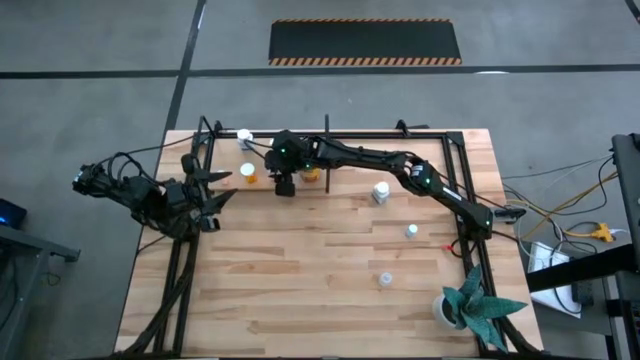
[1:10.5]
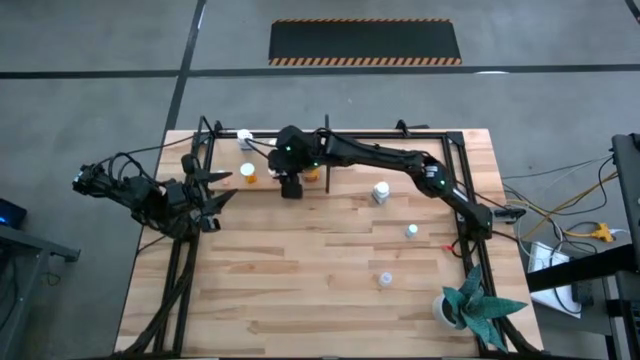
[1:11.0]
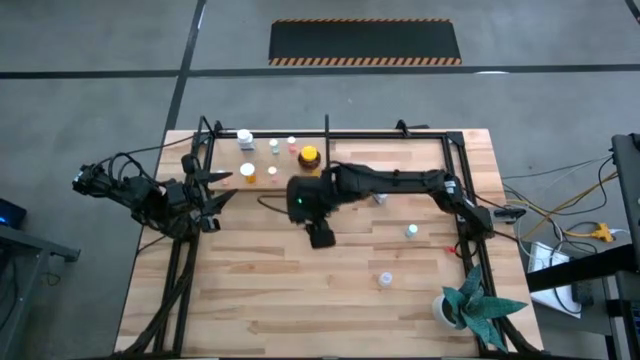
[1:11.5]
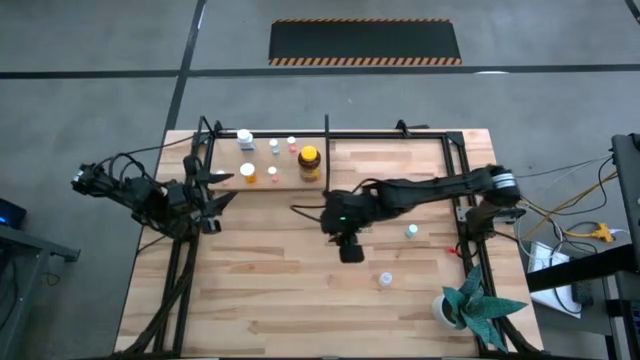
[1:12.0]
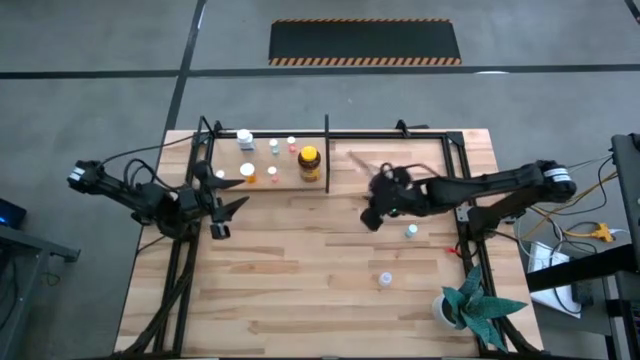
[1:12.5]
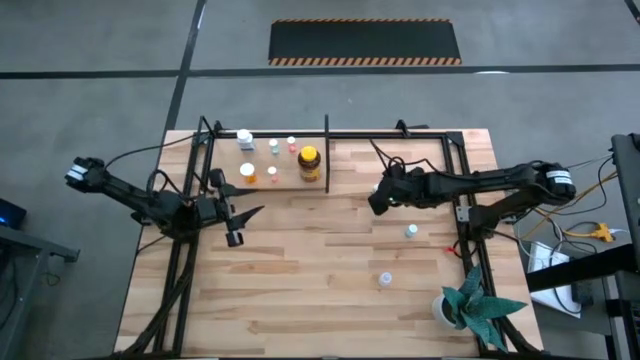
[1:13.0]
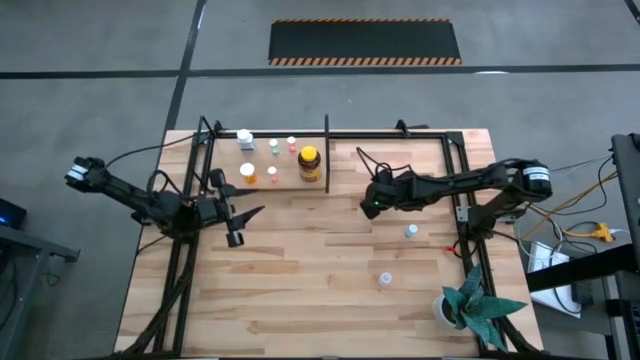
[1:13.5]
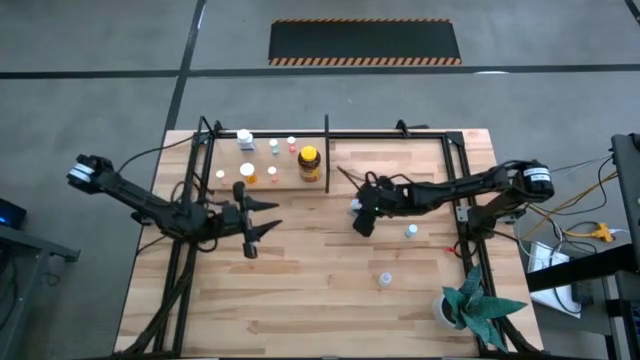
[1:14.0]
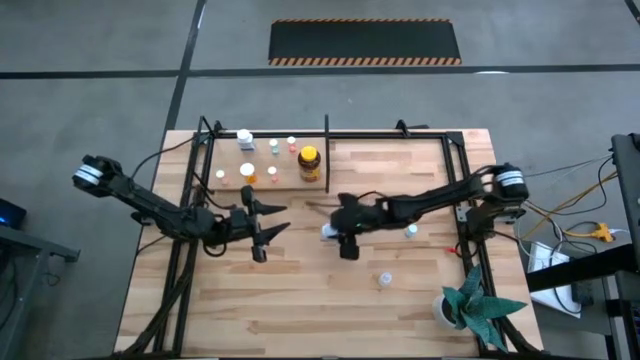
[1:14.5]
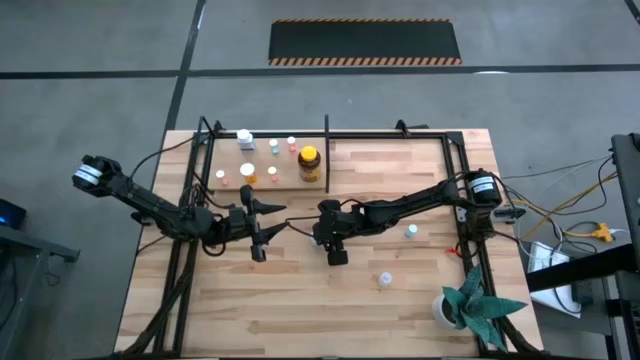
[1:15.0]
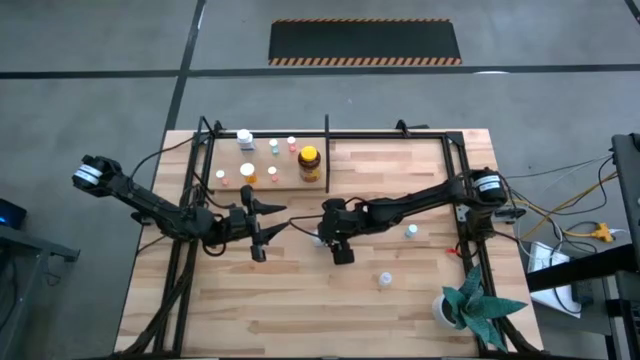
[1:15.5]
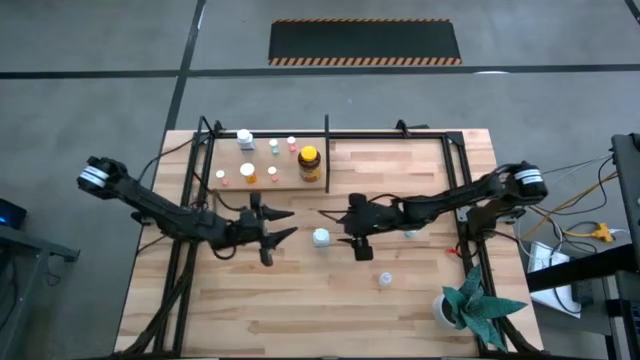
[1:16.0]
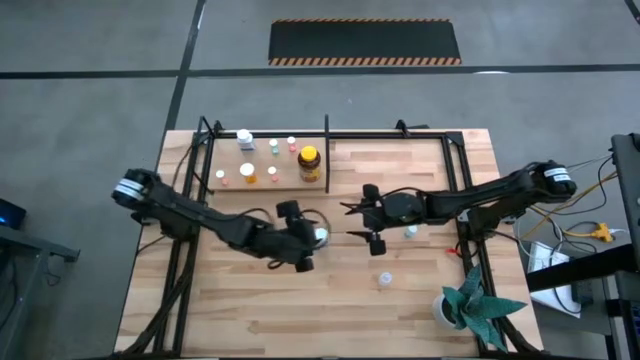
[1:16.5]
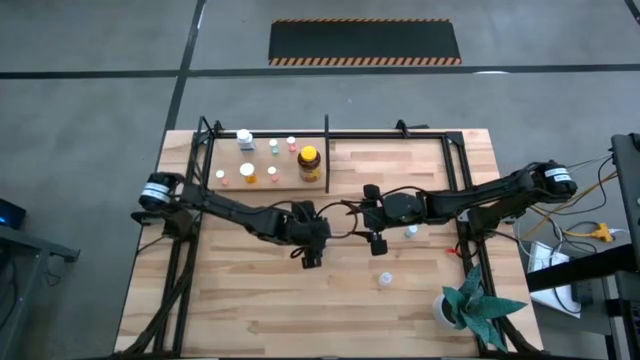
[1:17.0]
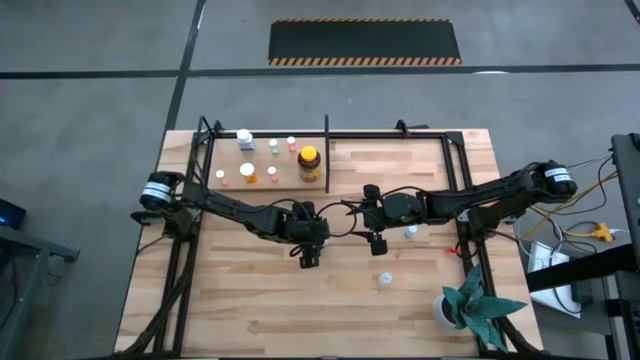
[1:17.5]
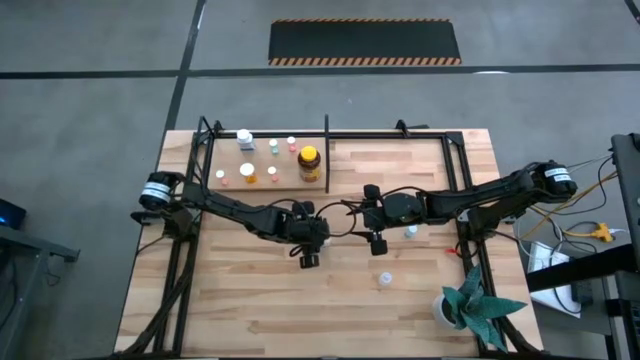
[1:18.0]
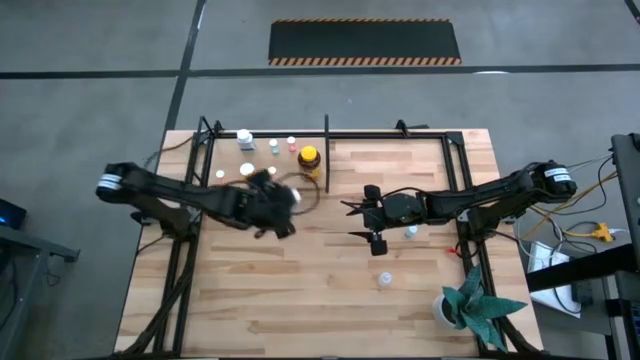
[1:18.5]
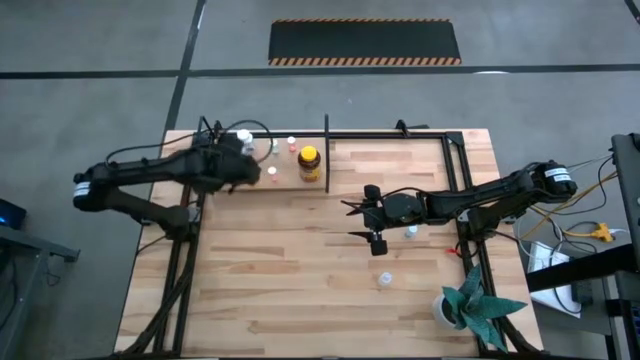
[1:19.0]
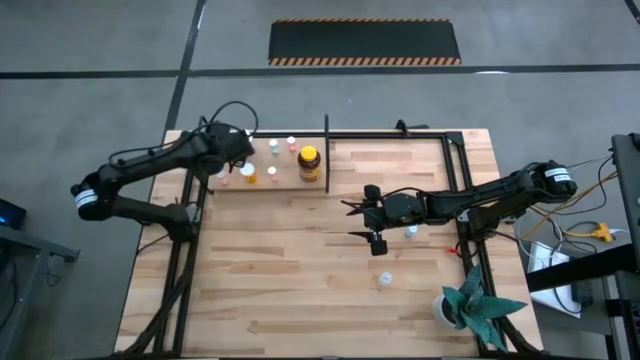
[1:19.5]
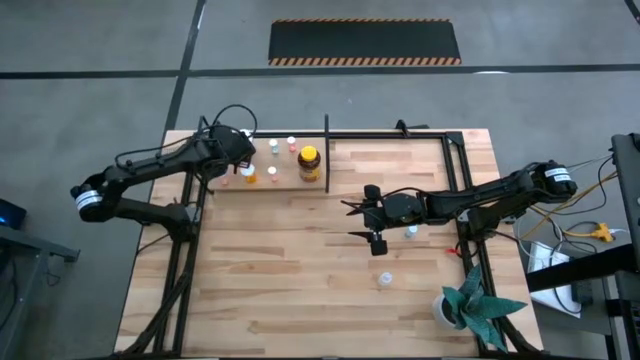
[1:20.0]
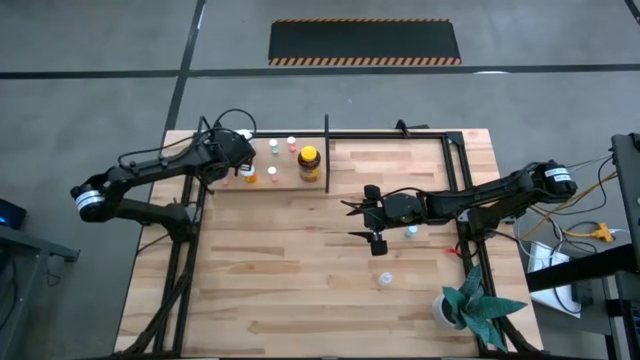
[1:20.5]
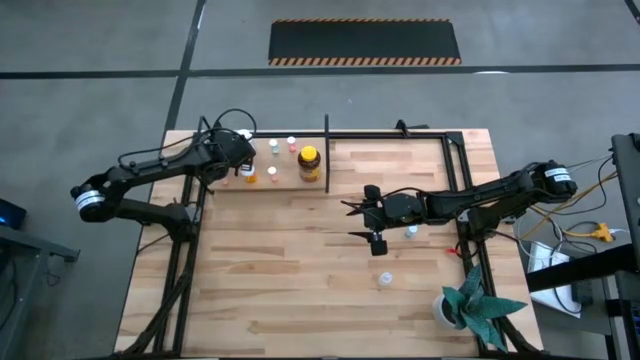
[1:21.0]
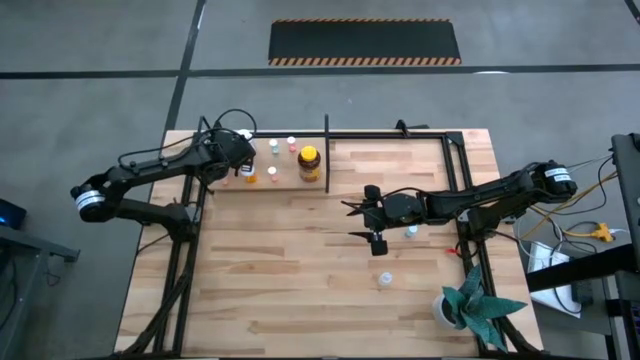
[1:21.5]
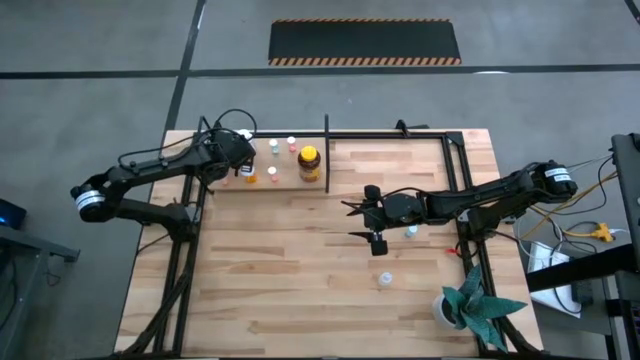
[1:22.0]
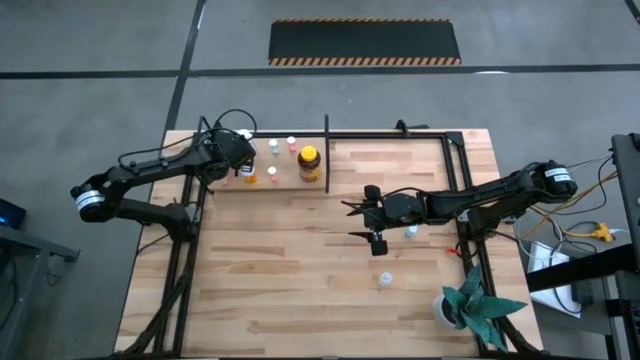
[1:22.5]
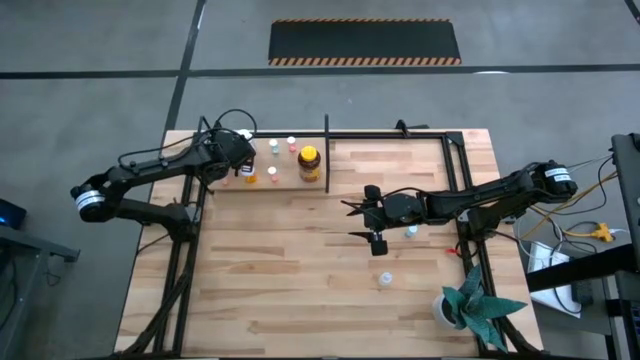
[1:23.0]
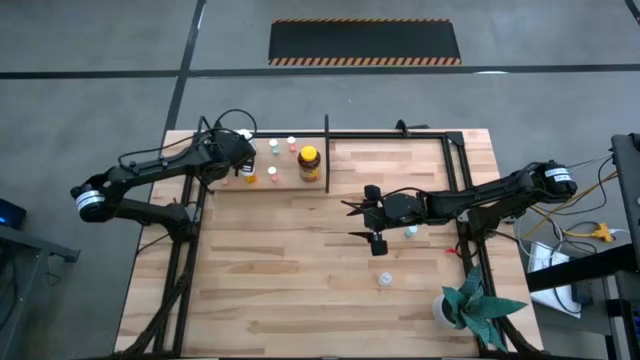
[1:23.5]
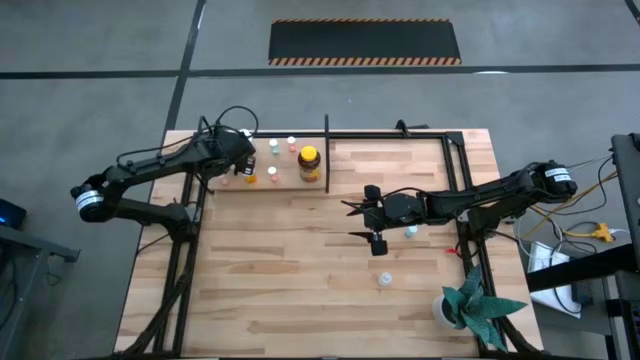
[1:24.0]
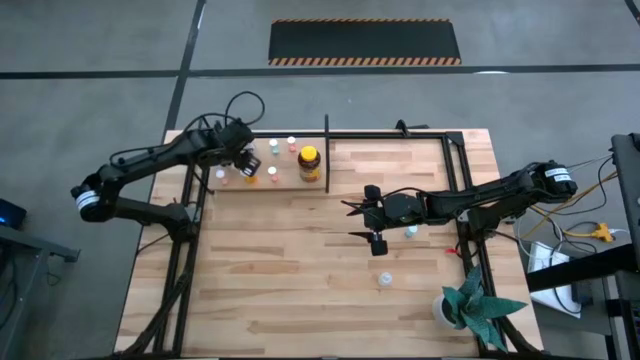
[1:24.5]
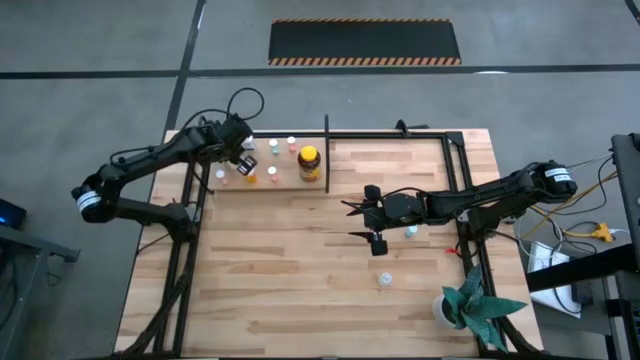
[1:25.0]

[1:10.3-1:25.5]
Task: Pick and place medicine bottles onto shelf by color
Put the white pill bottle on the shelf

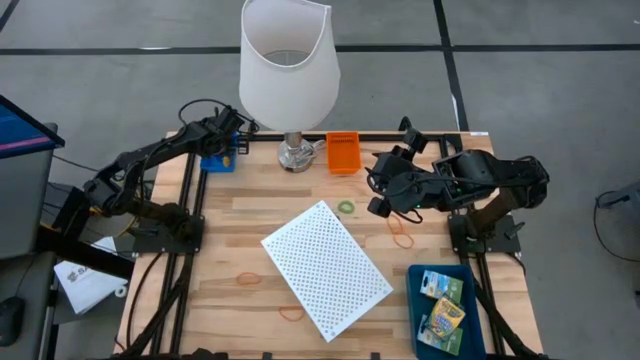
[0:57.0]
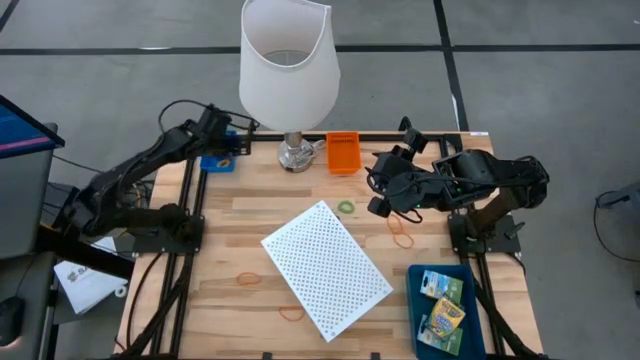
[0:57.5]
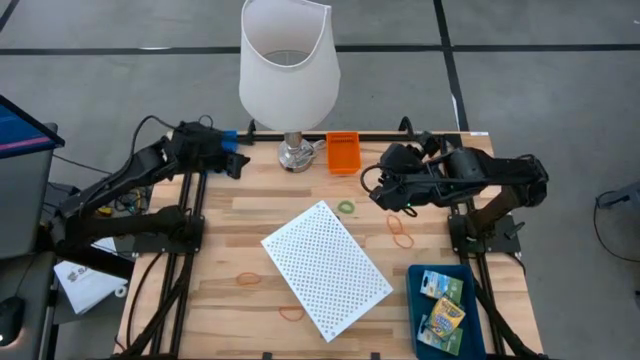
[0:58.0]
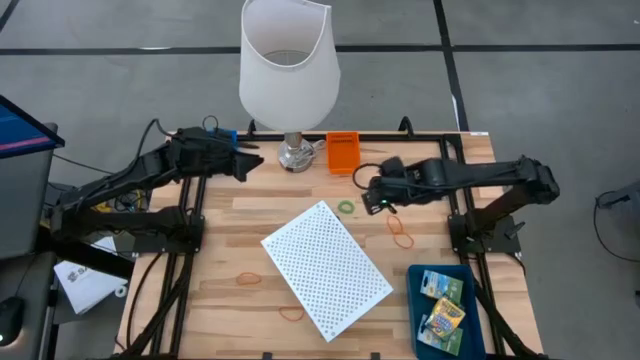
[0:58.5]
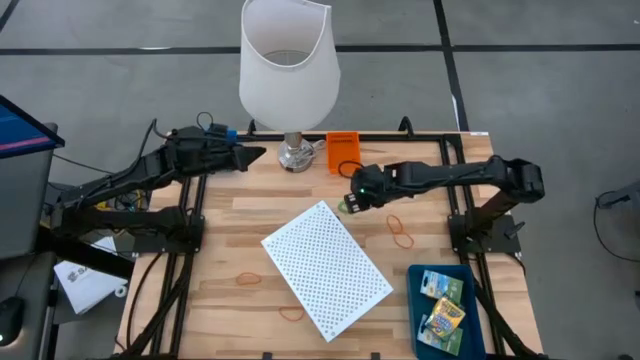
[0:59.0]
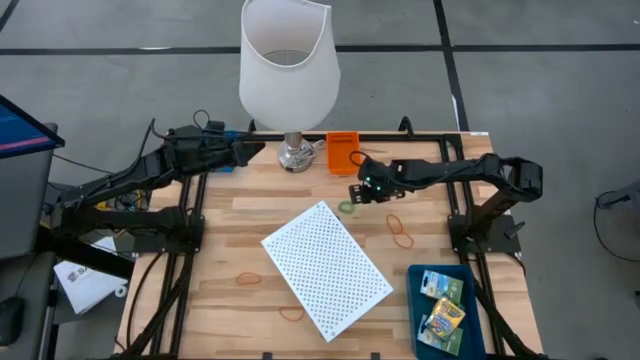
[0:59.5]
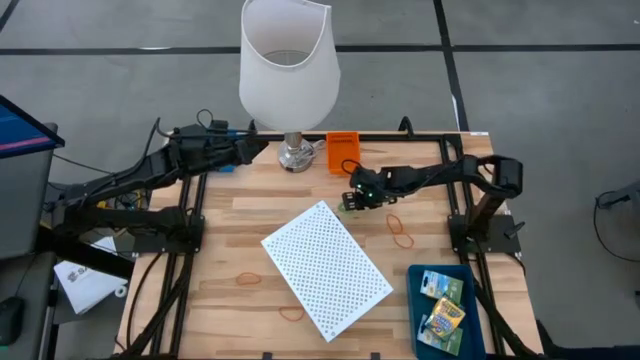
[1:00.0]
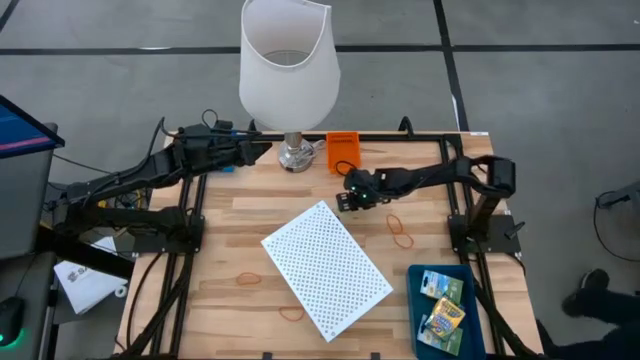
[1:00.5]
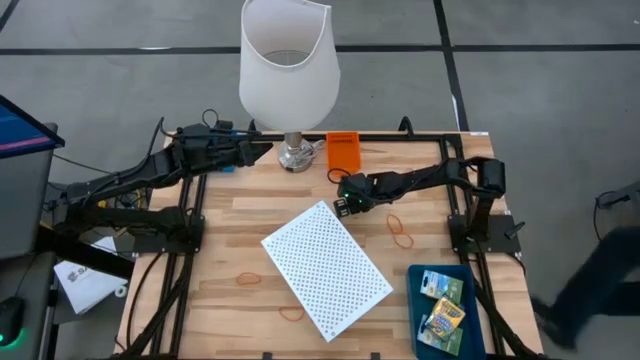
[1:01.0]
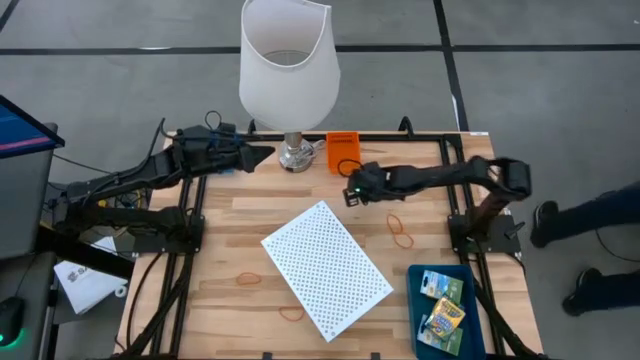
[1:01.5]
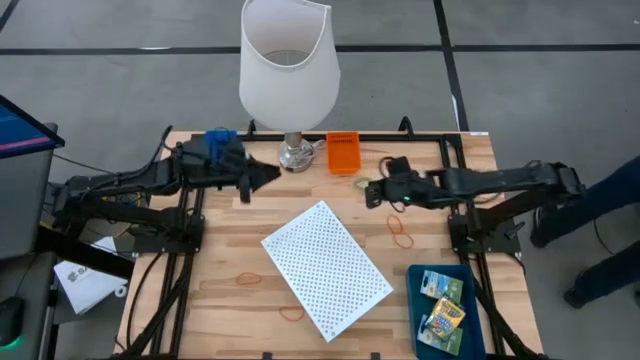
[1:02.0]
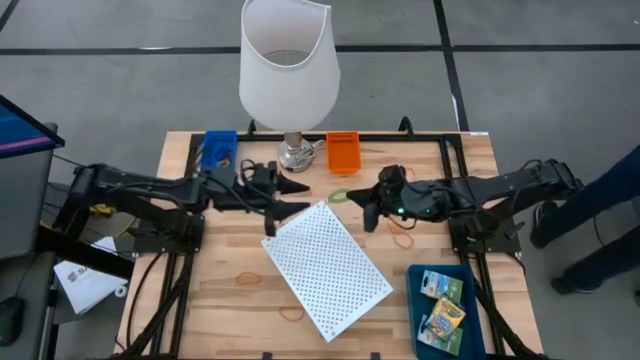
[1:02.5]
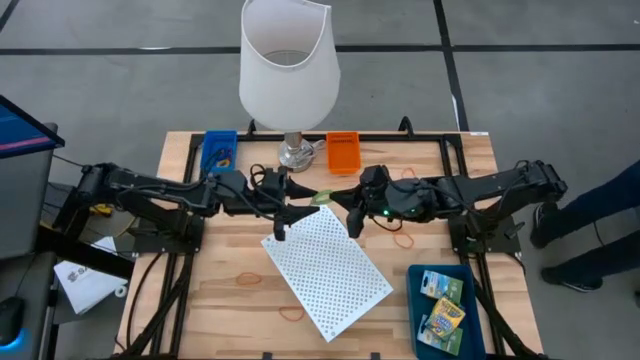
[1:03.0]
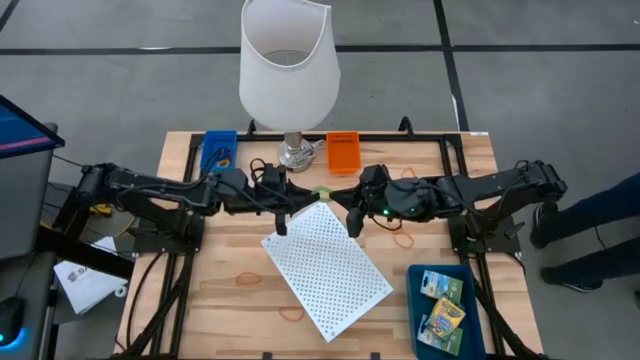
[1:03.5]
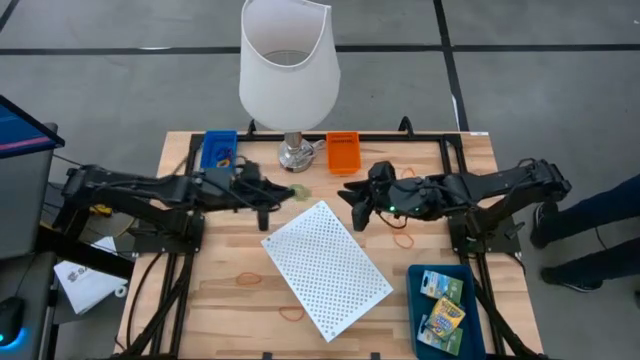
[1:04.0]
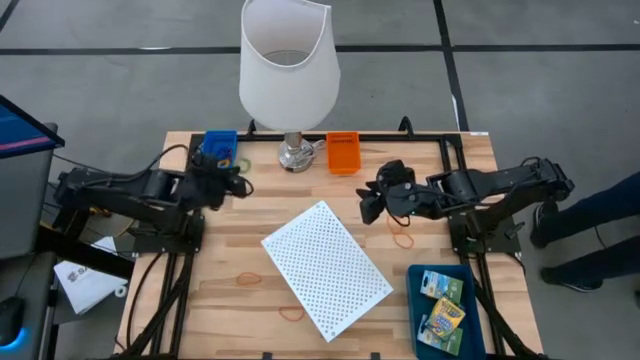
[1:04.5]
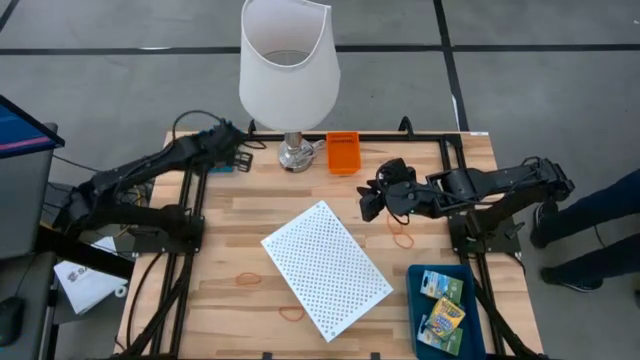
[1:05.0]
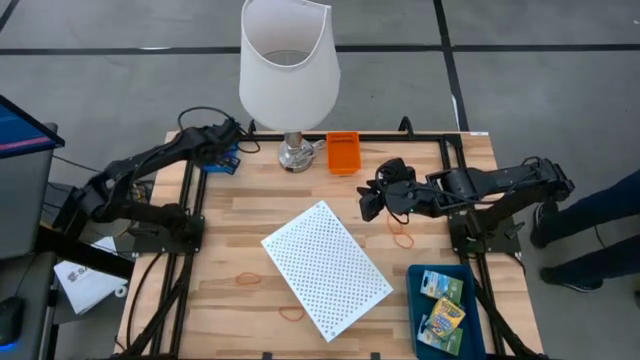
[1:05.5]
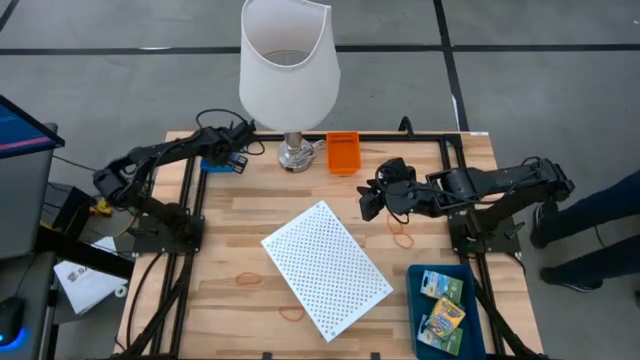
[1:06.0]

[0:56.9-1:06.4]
Task: Pick & Place Office Desk Supplies
Put the green spring keychain into the blue bin
